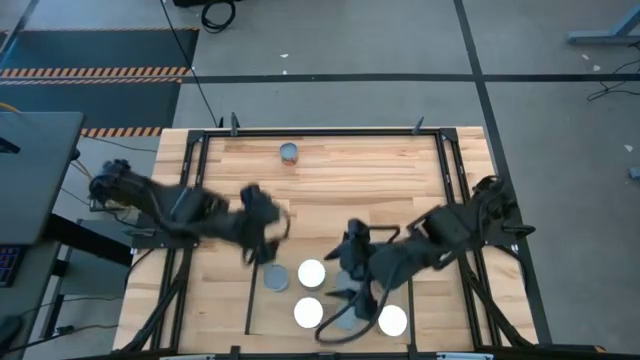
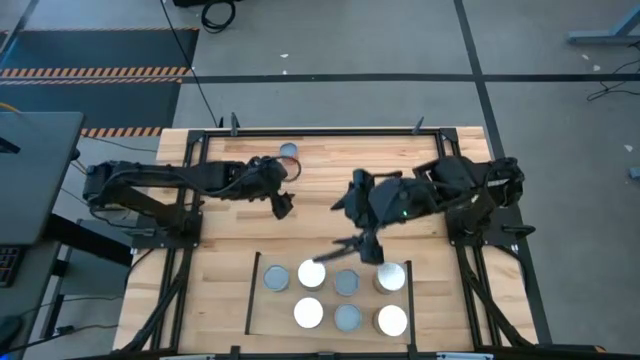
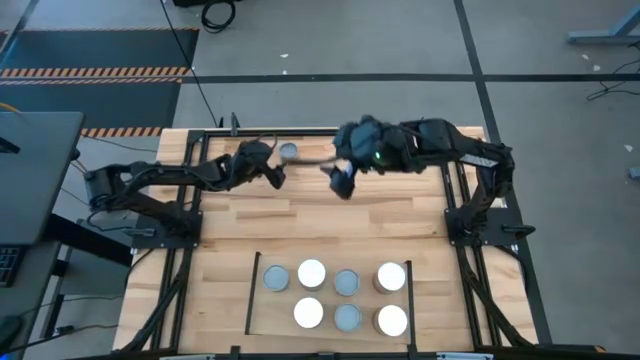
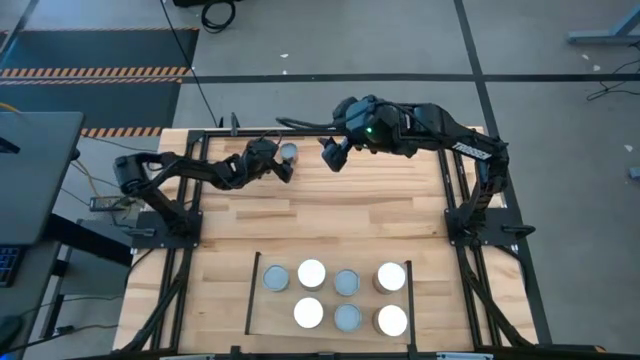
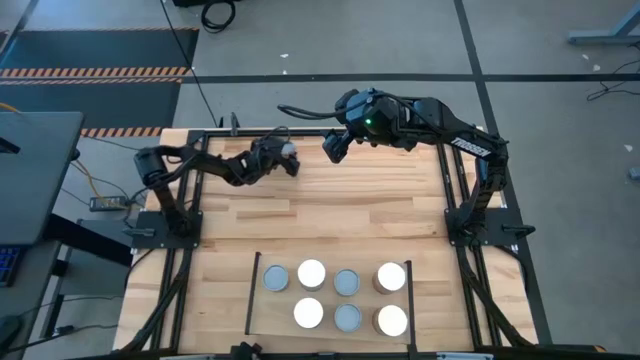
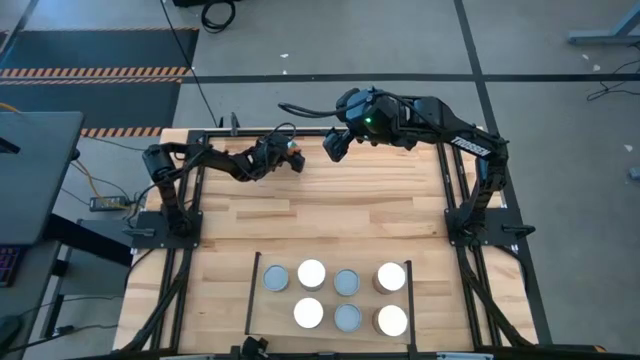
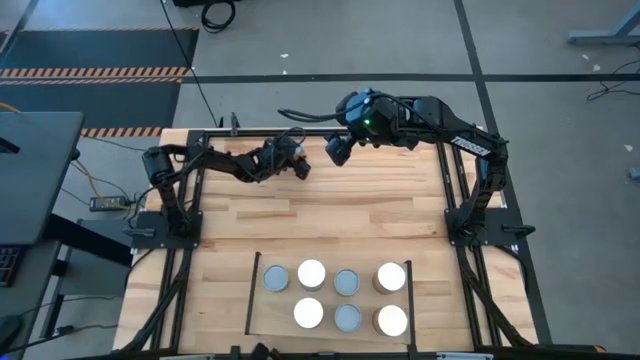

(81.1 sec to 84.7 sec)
Task: Pick and place cans onto a shelf
Put the canned oranges on the shelf

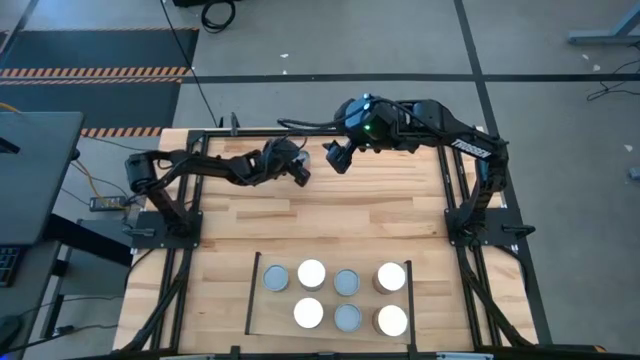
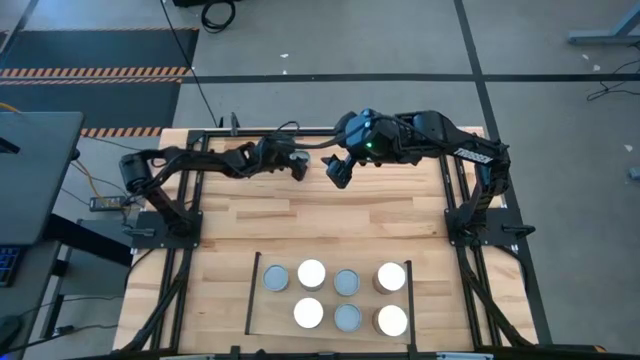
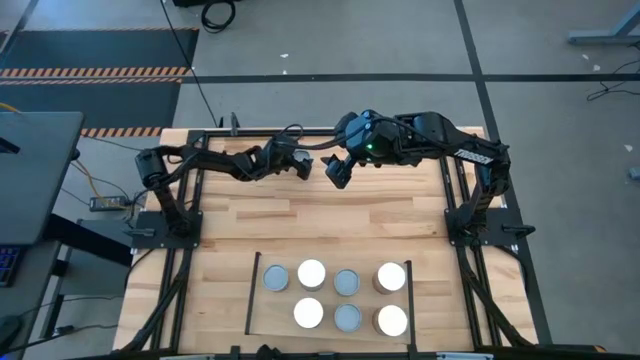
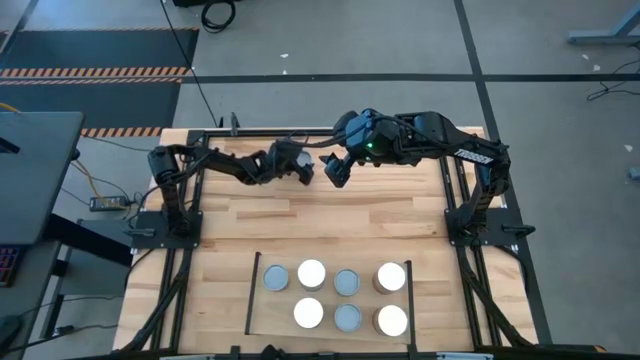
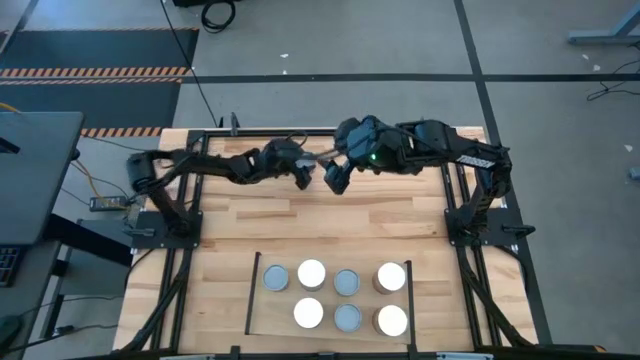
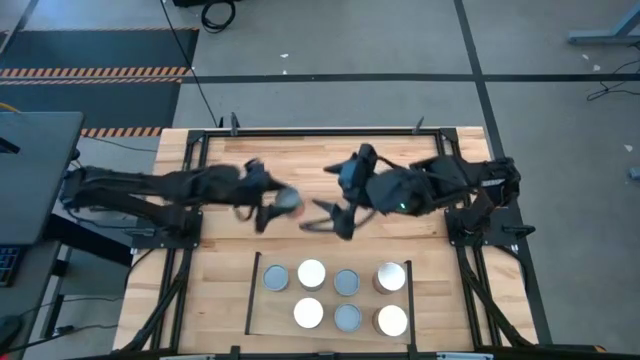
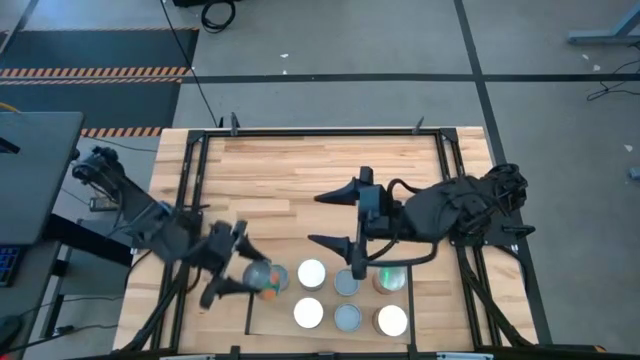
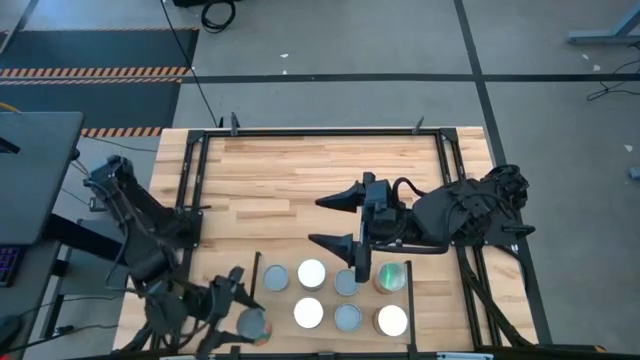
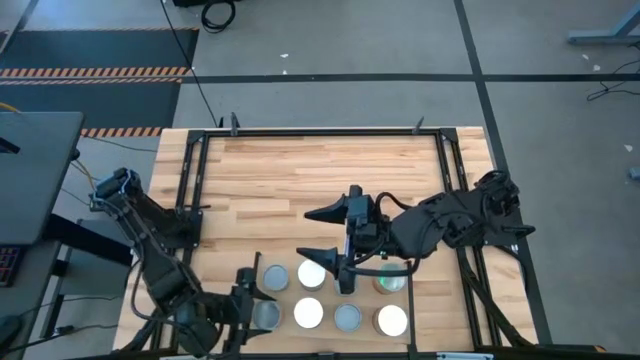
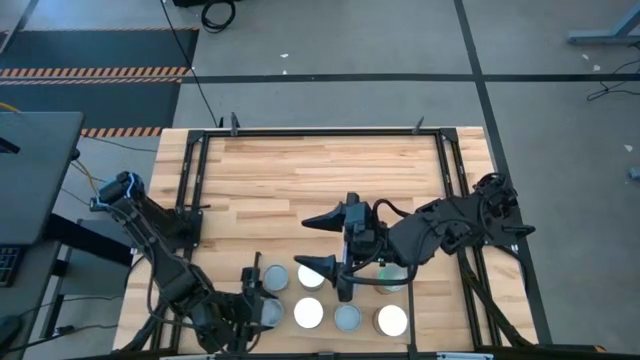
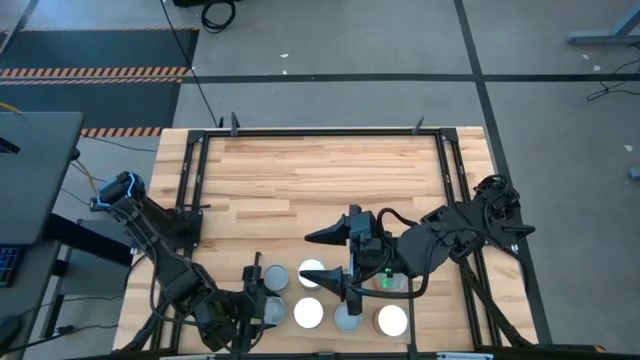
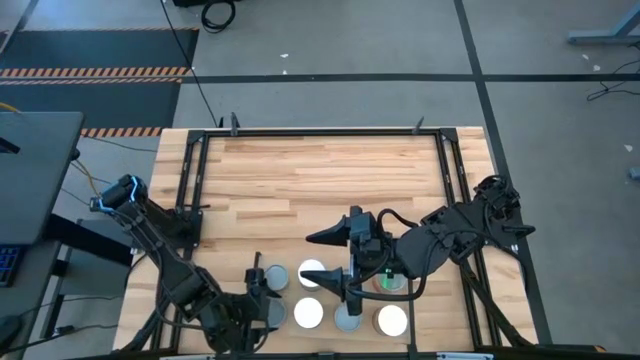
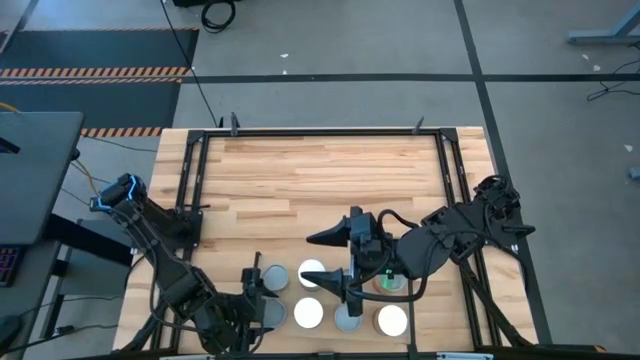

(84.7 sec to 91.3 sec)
Put the canned oranges on the shelf

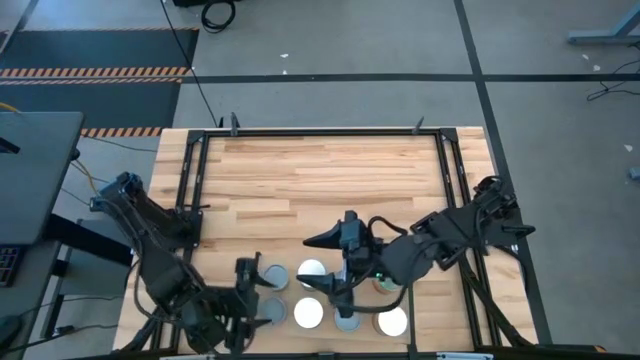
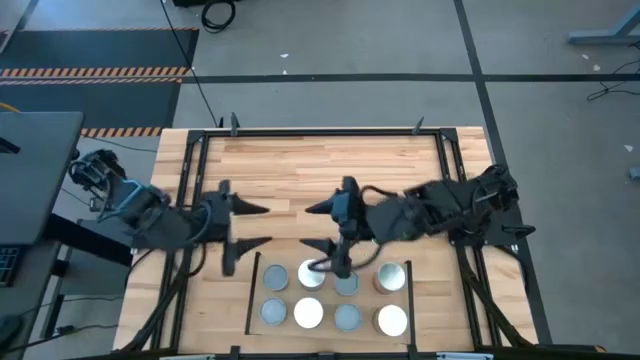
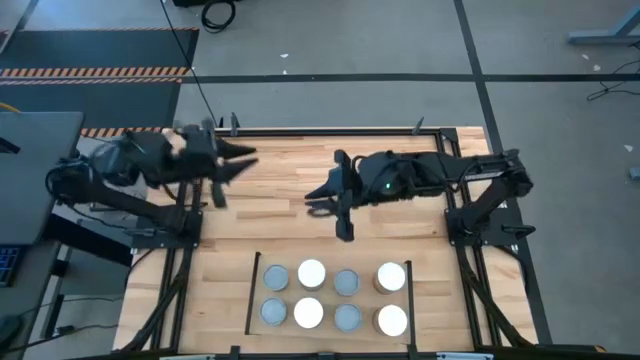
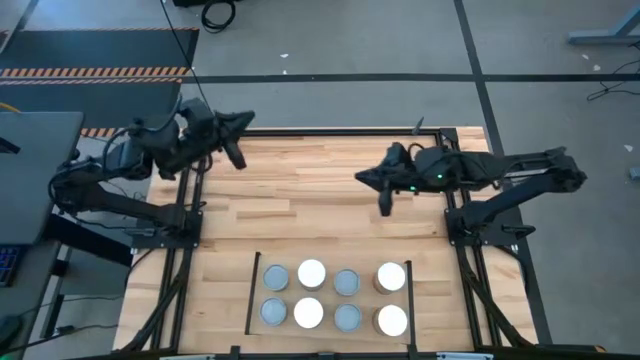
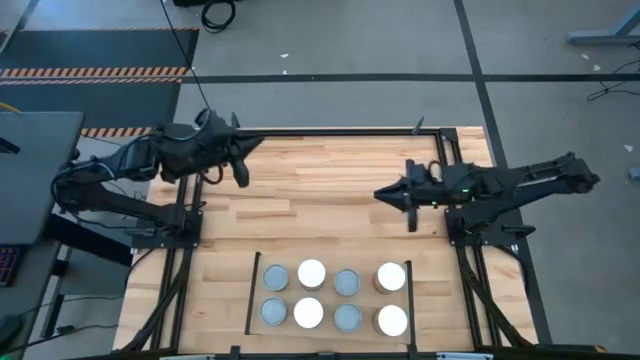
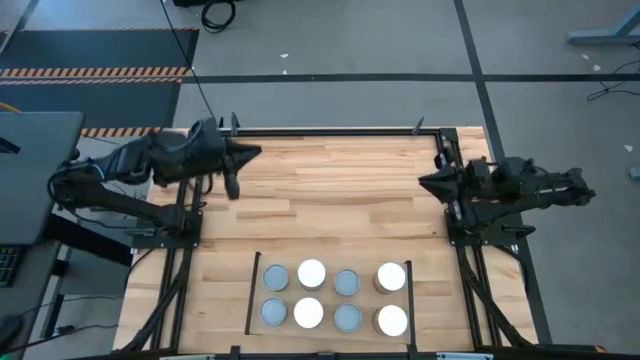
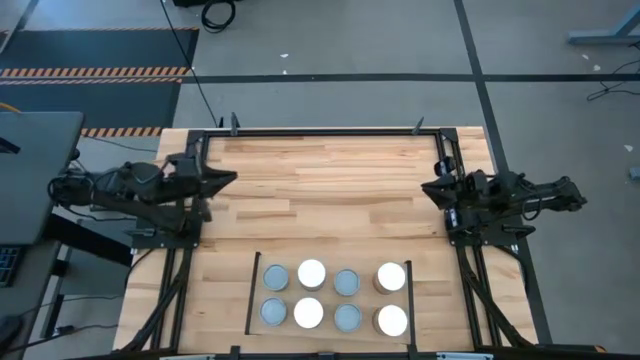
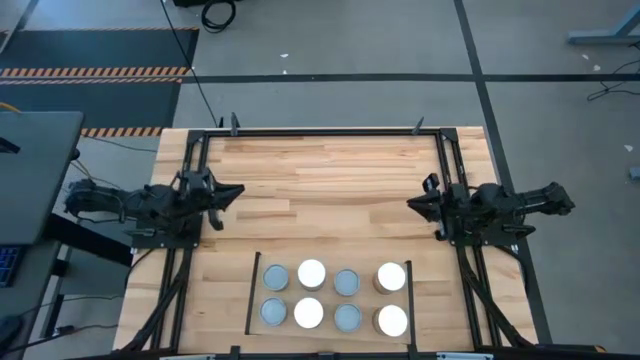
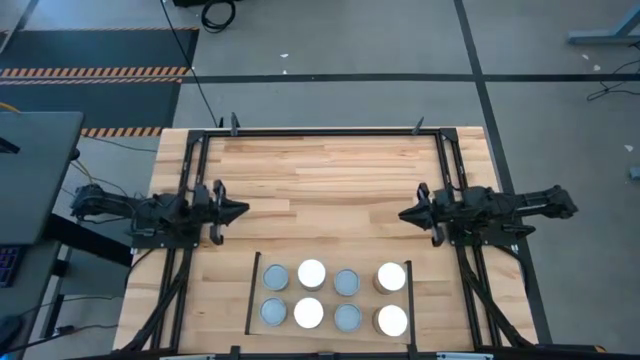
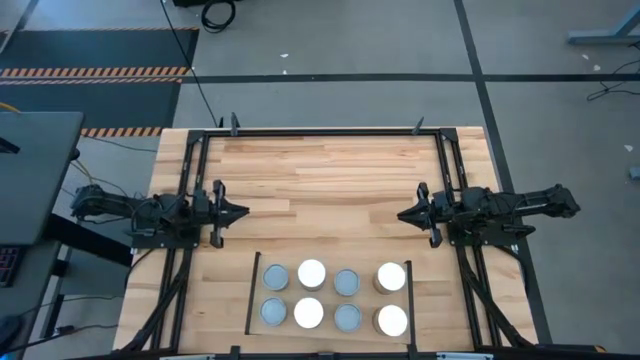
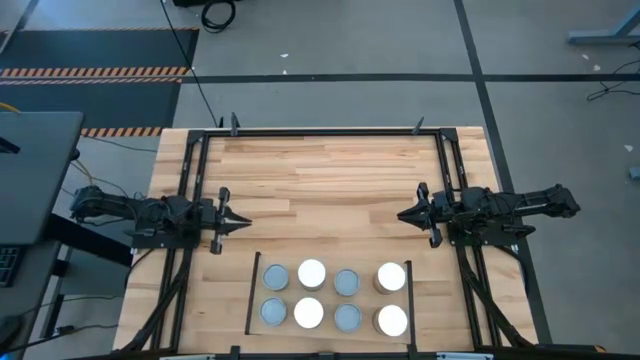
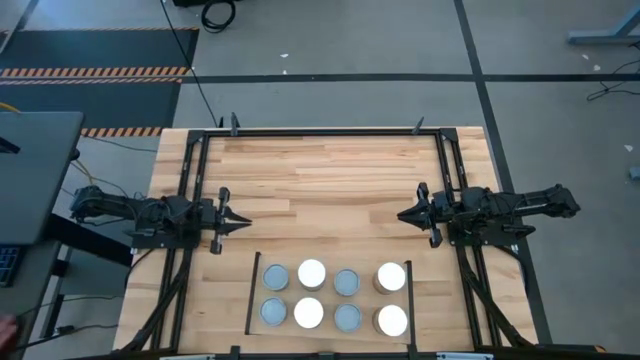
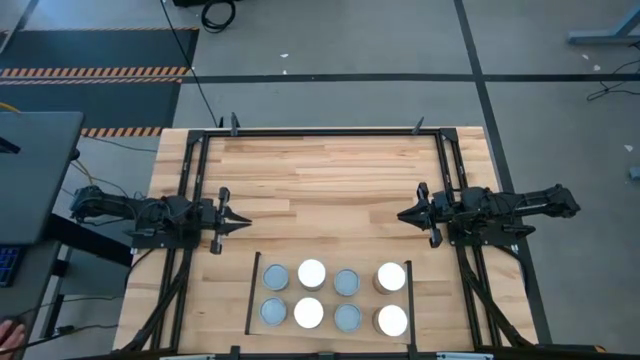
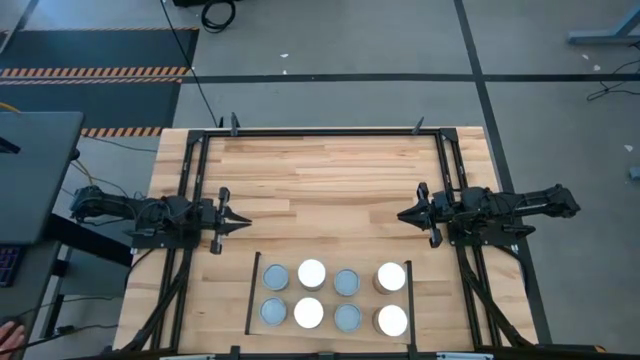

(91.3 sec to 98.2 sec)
Return to Home Position

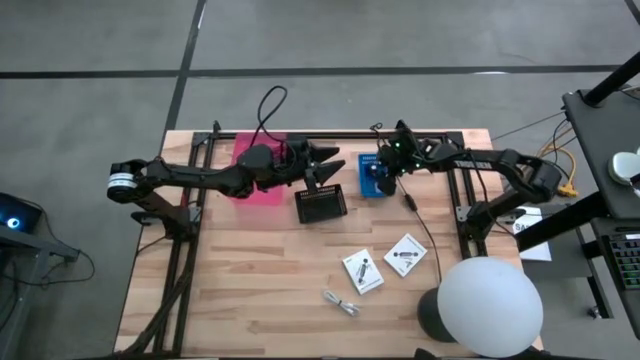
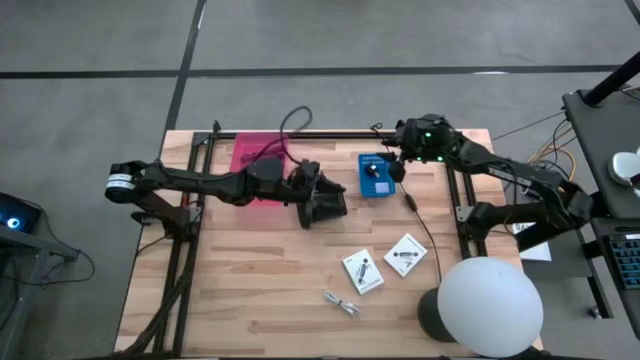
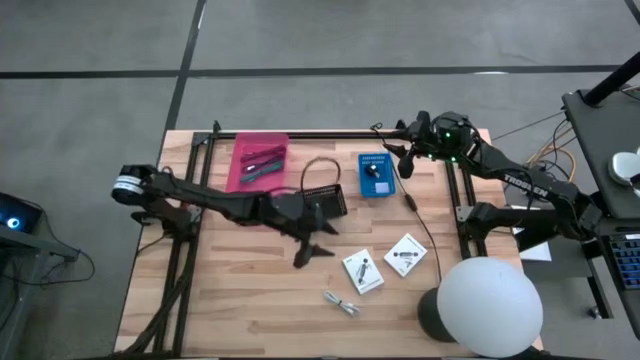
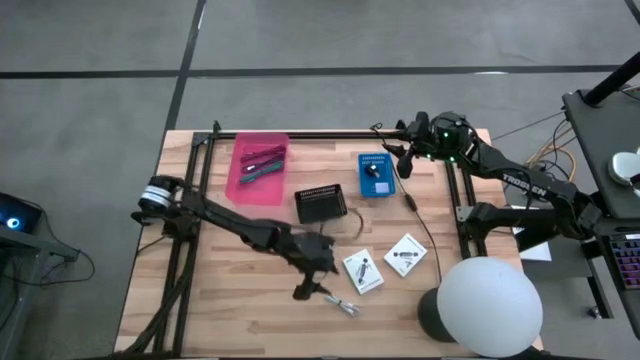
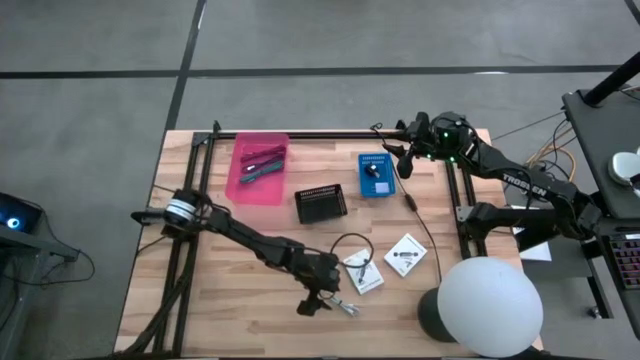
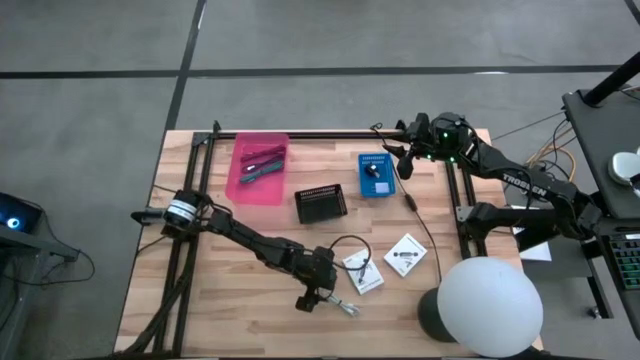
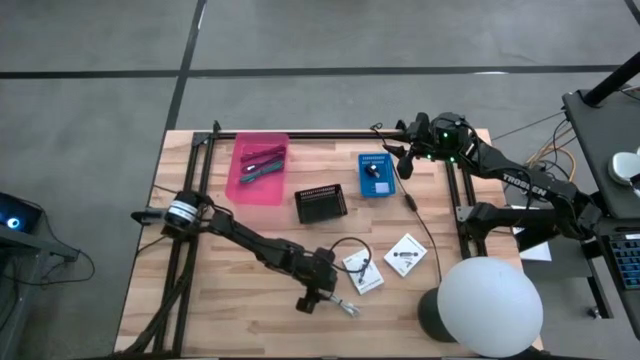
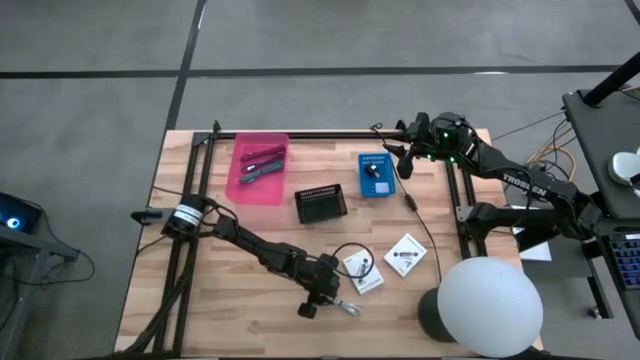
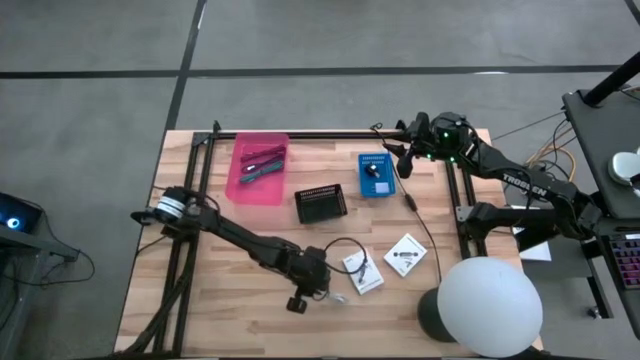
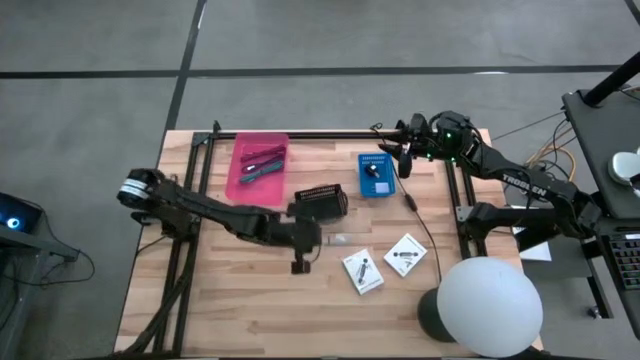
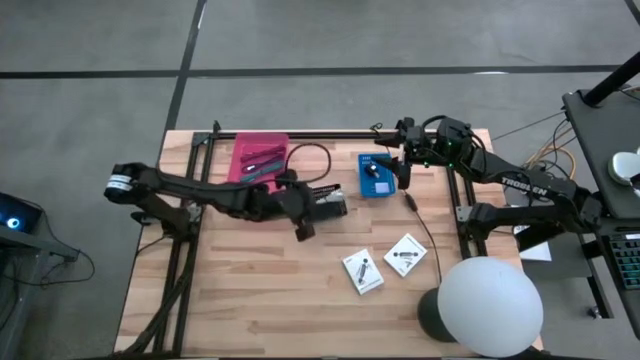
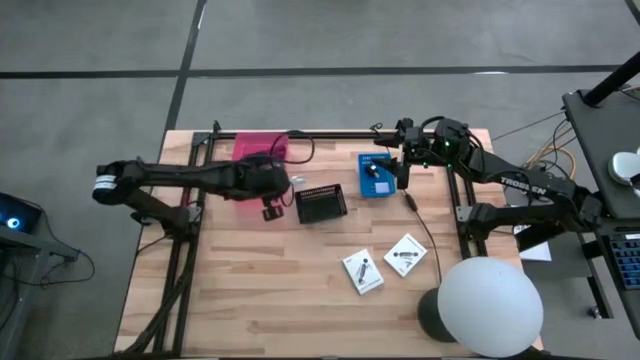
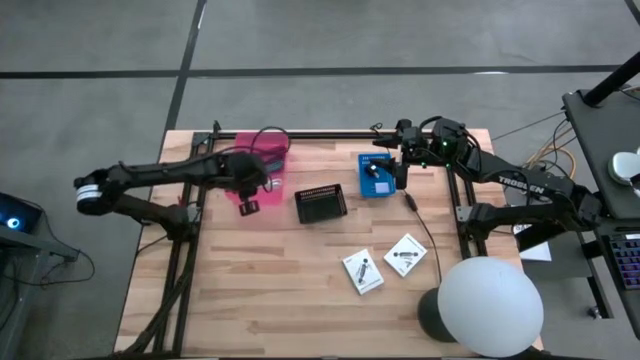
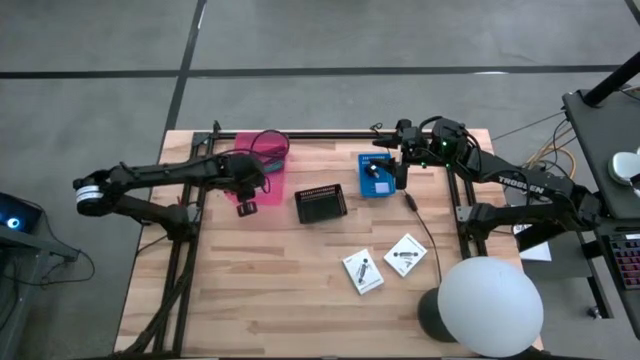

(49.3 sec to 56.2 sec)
Task: Pick and place items into bin
Put the white charger cable into the pink bin
